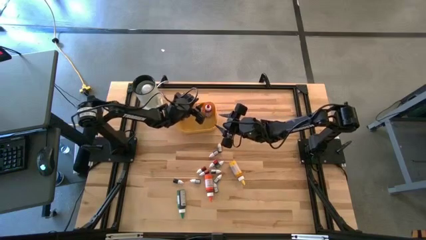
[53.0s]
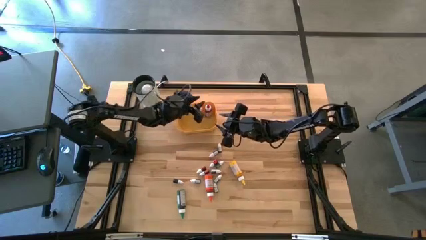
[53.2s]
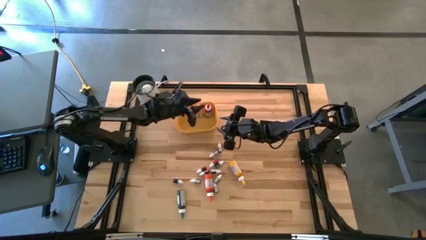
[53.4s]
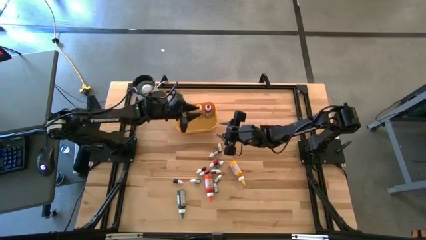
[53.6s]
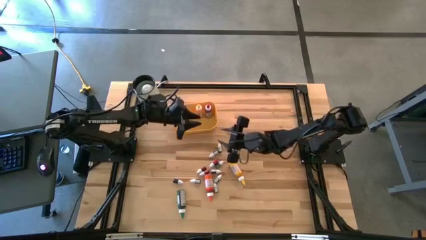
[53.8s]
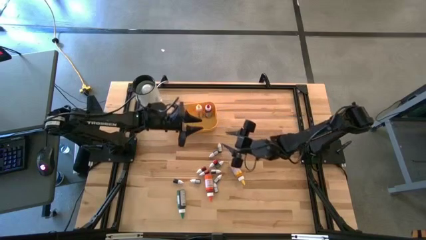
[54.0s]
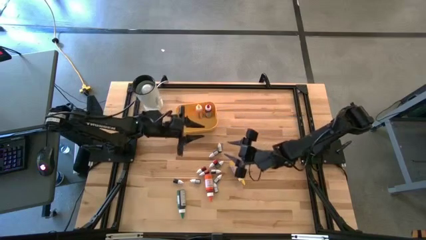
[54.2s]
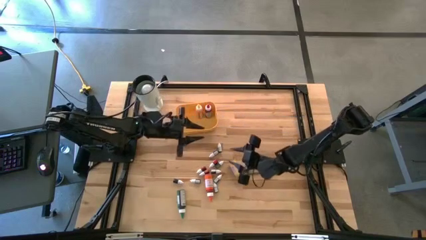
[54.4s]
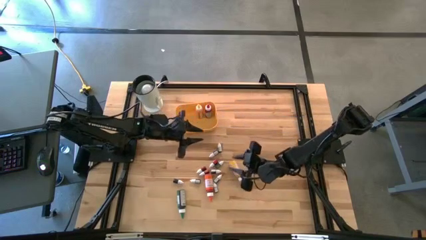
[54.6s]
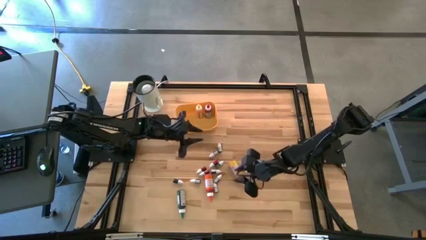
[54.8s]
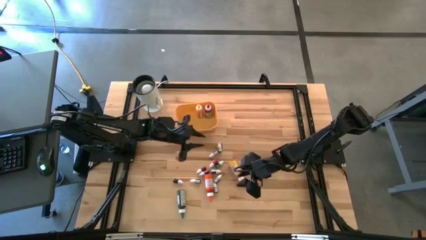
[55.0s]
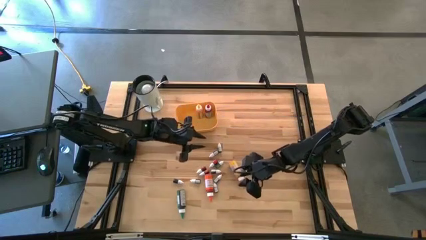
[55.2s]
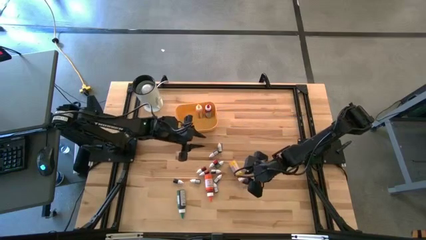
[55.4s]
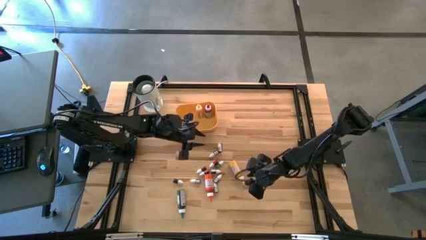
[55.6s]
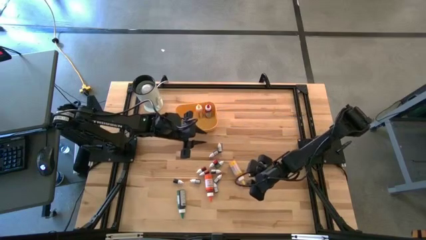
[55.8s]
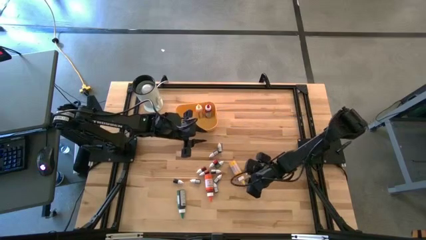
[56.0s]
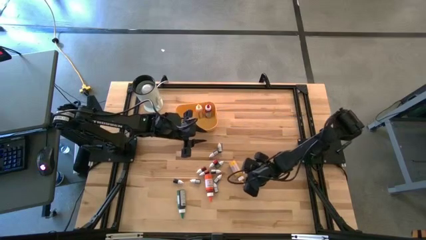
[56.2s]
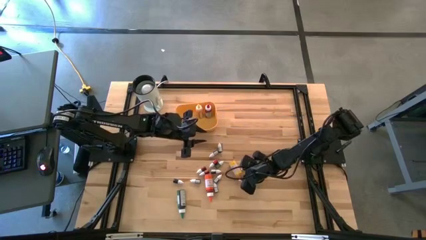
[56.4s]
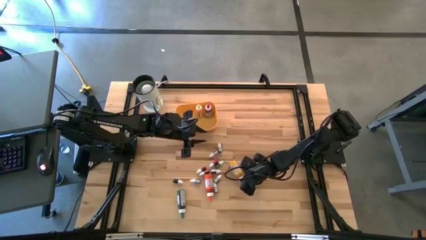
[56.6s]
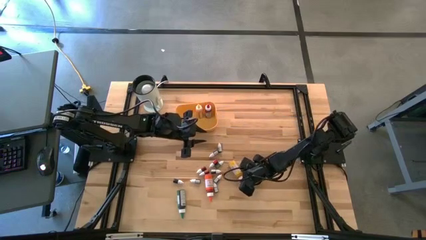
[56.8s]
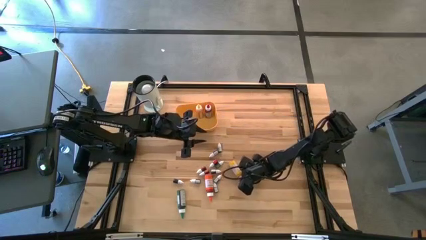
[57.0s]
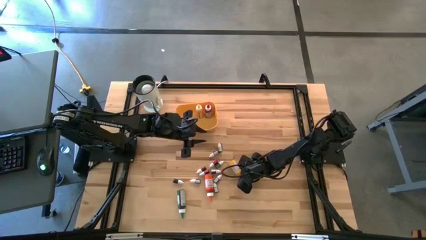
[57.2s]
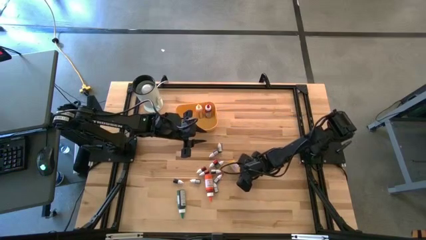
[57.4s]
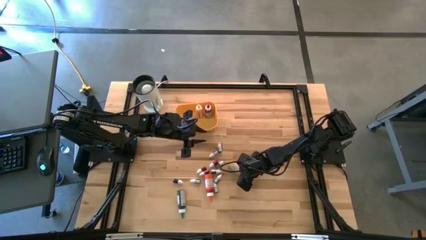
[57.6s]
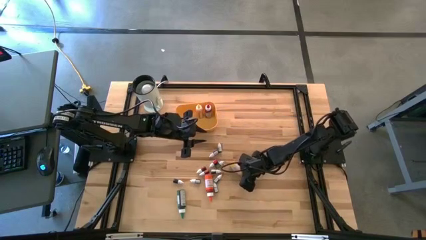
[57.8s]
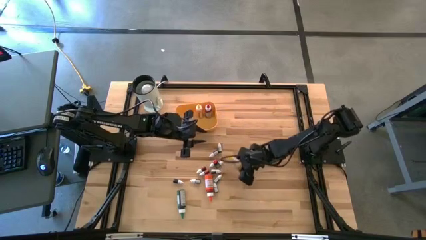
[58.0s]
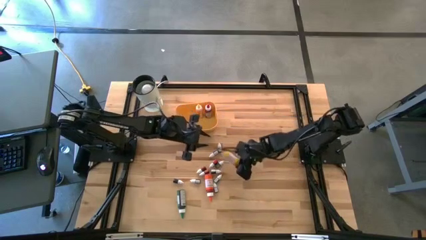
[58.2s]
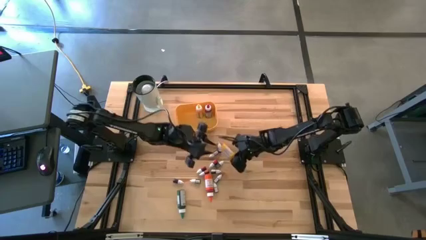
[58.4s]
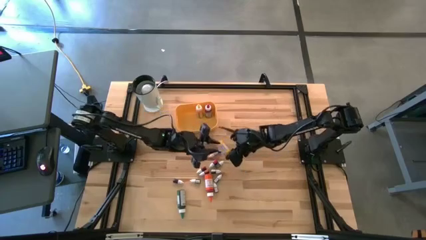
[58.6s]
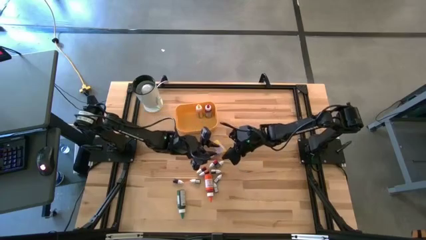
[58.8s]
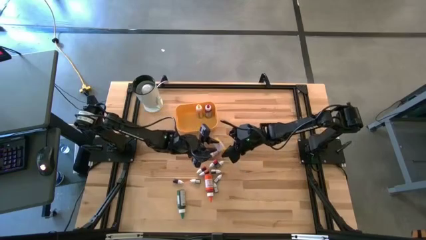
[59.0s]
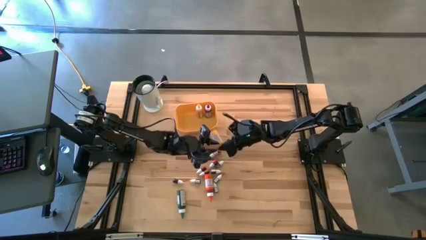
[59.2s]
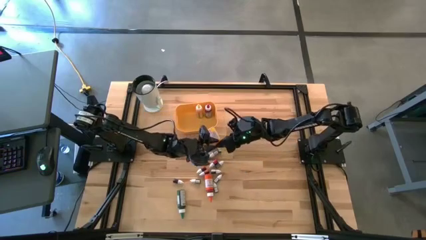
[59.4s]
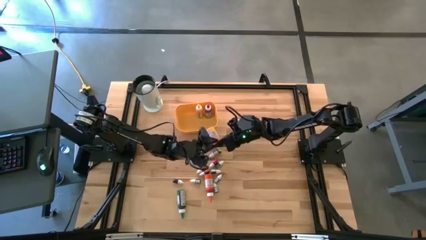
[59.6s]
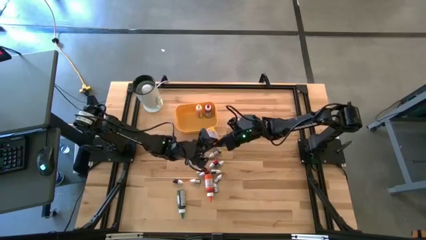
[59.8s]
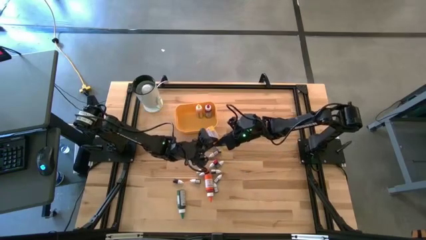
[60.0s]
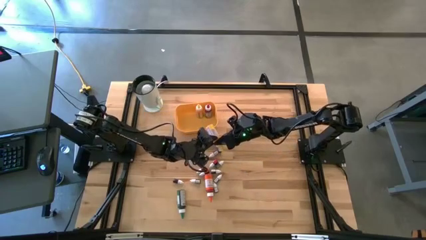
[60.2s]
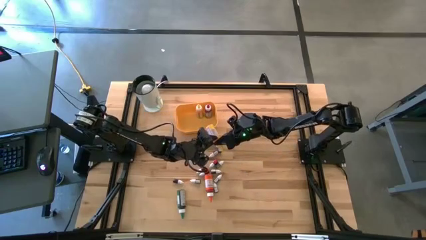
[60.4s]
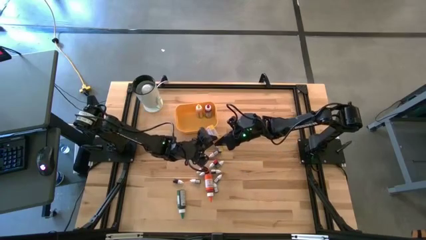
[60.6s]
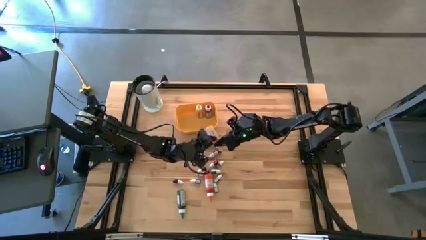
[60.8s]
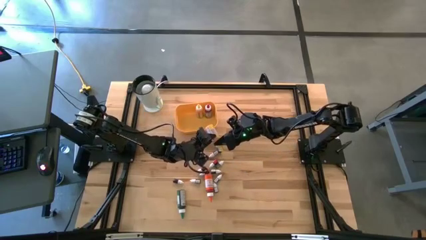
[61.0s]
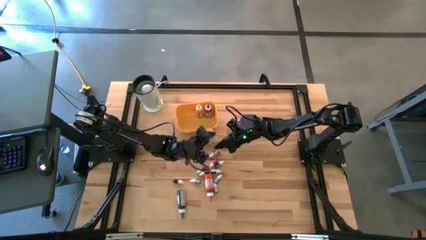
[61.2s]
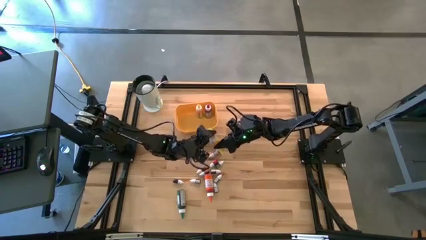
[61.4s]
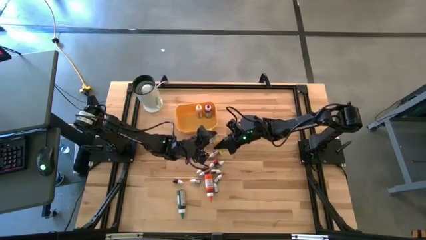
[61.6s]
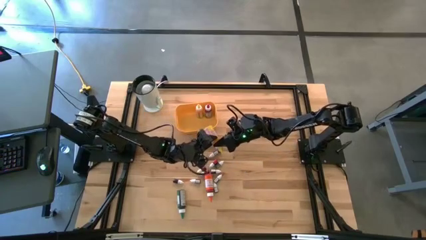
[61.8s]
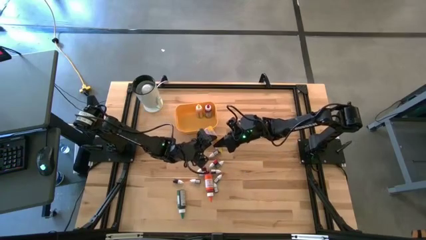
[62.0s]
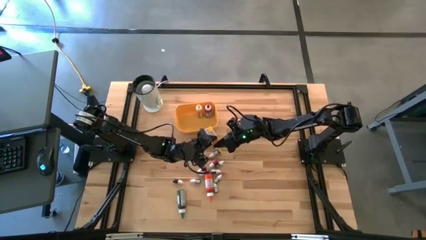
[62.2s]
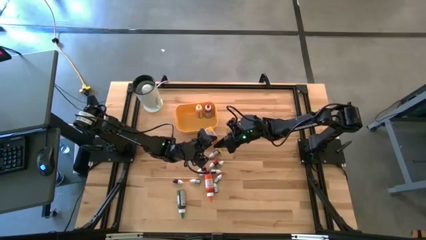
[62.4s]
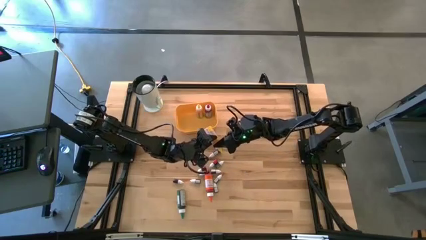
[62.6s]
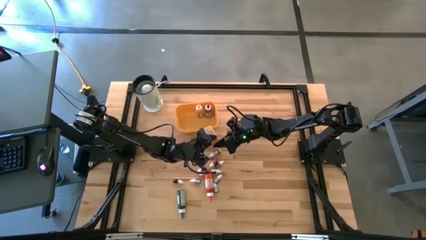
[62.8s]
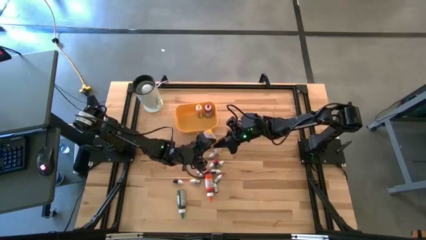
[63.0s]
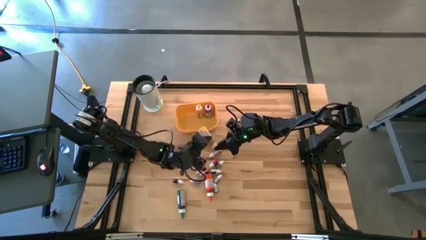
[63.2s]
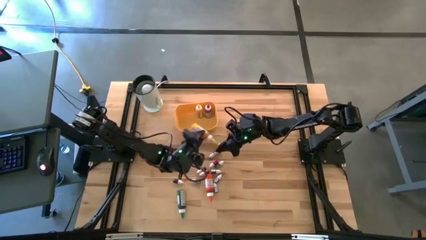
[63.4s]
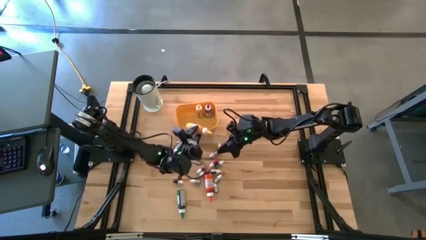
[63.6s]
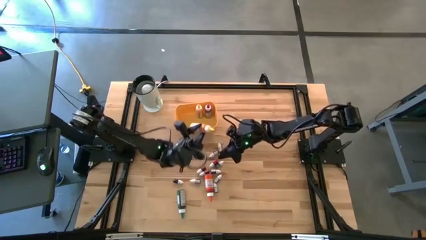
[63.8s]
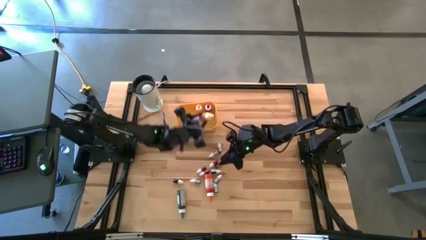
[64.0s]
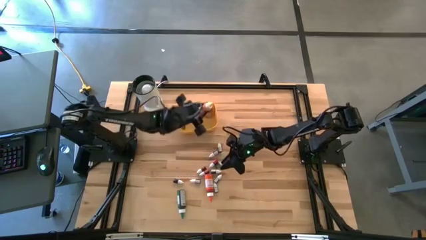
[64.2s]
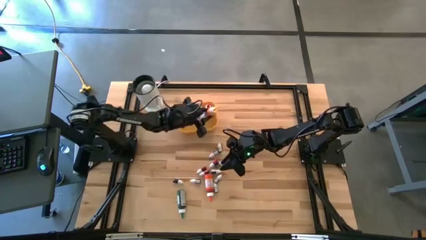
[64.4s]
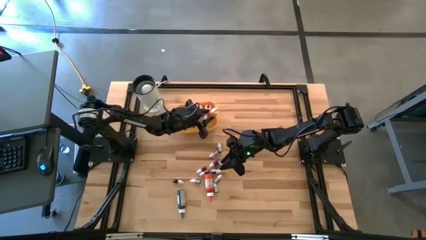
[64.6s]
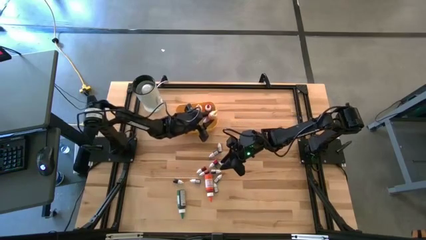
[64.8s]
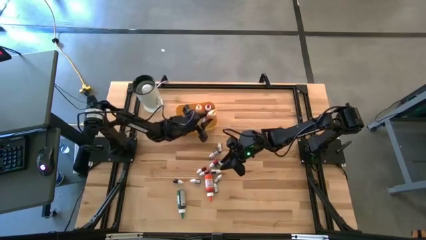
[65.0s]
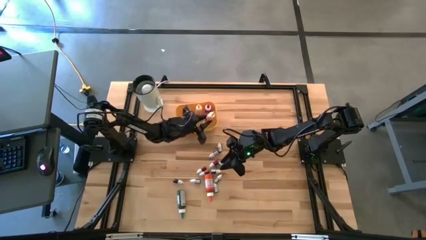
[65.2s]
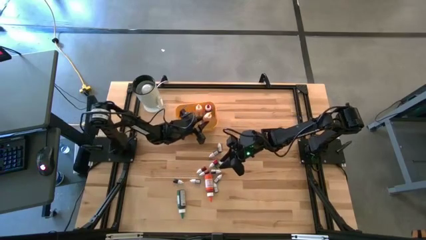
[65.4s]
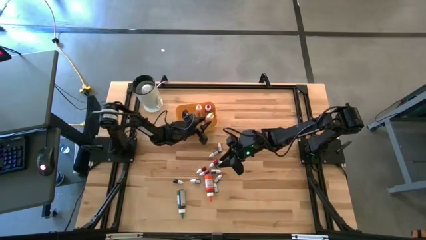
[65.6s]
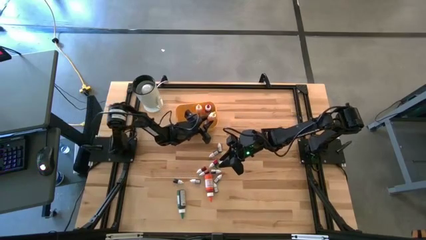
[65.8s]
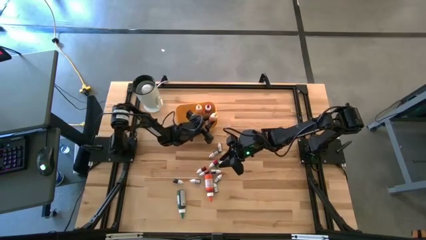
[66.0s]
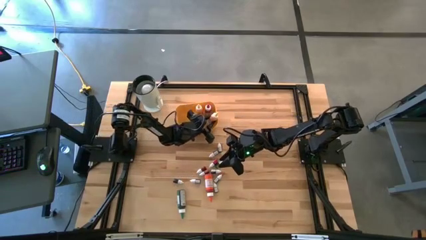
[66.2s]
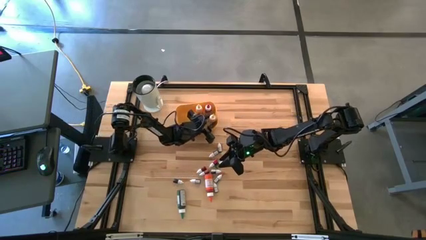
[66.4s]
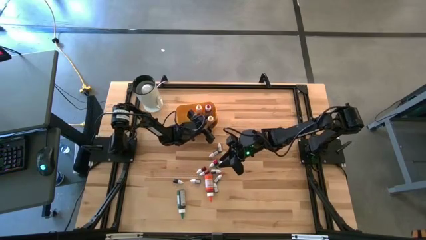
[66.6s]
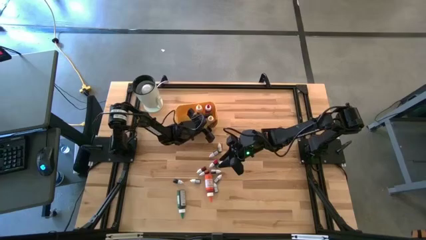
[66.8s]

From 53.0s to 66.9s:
Task: Pick & Place food coloring
Put the large yellow food coloring bottle into the yellow bin

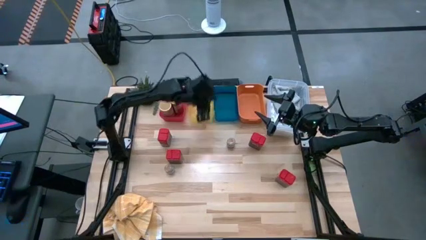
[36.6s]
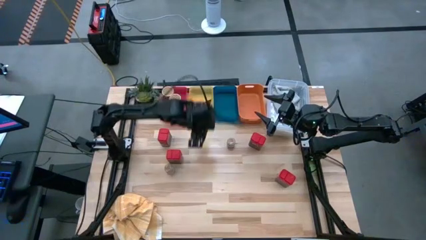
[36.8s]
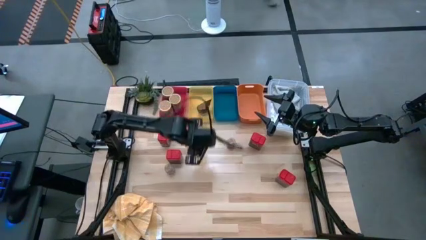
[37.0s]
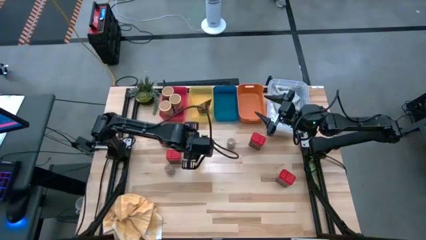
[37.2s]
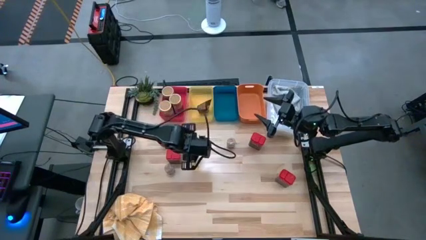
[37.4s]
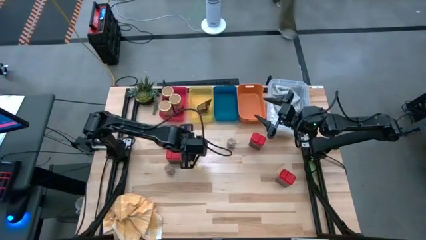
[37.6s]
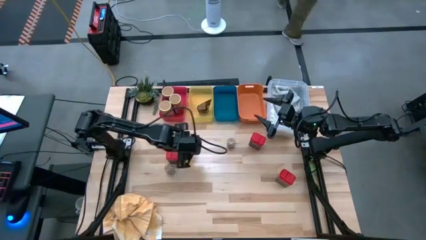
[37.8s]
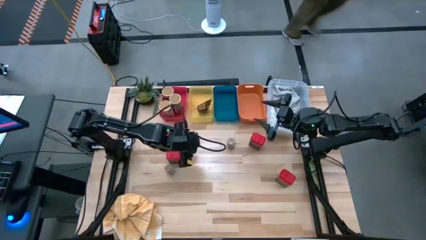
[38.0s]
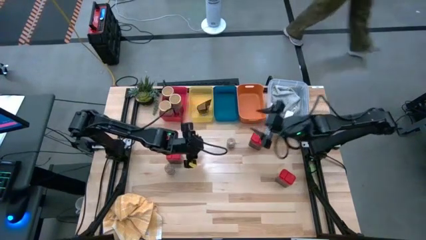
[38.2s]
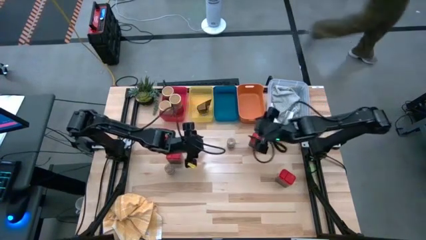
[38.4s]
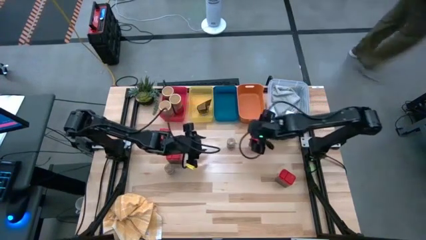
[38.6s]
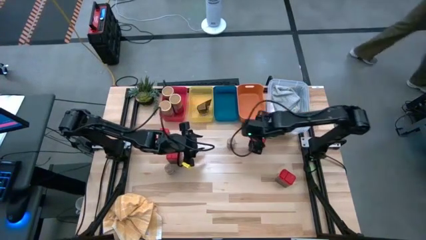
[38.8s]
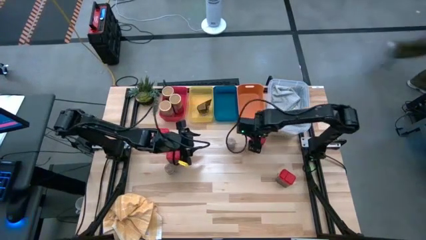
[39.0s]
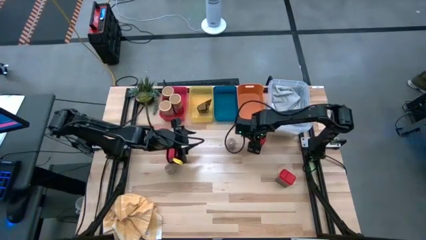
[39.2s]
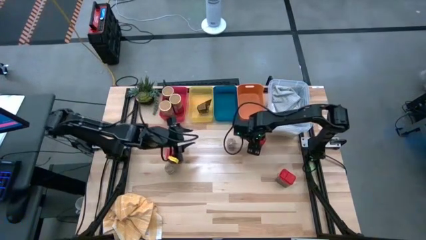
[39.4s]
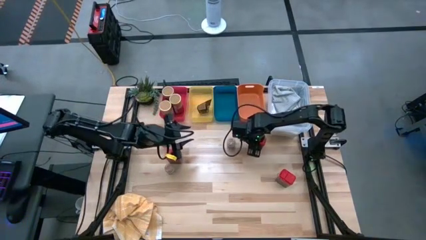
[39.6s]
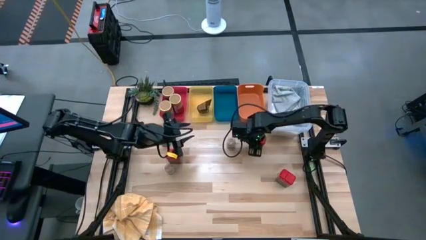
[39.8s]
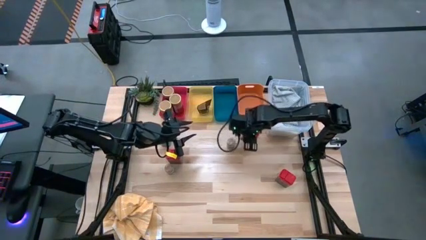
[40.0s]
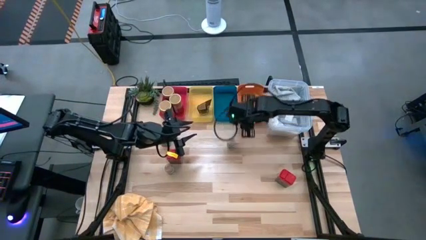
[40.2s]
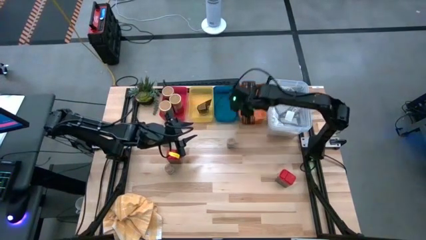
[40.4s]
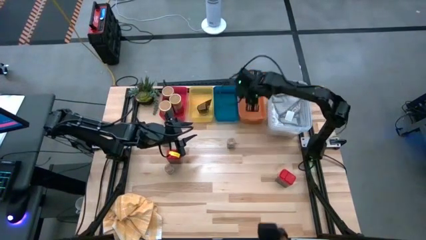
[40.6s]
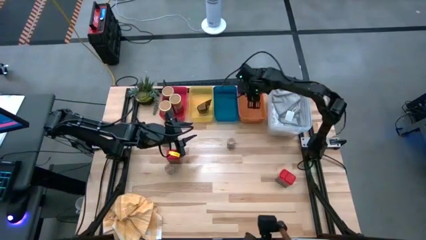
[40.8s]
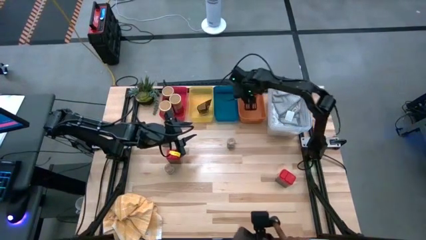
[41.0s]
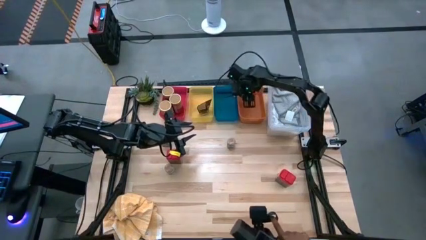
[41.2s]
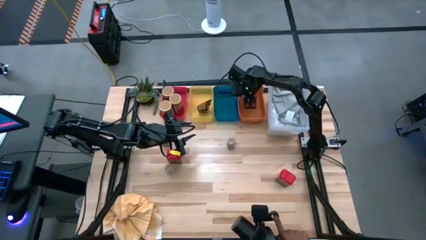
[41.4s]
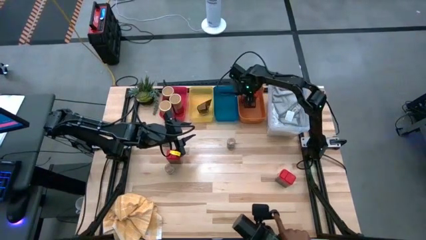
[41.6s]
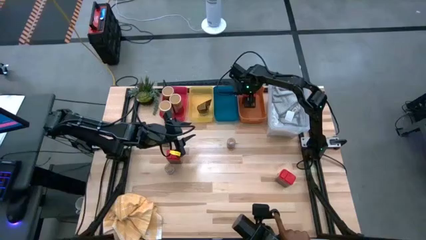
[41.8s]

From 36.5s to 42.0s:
Task: Sort spices by type
Put the red spice can into the orange bin
